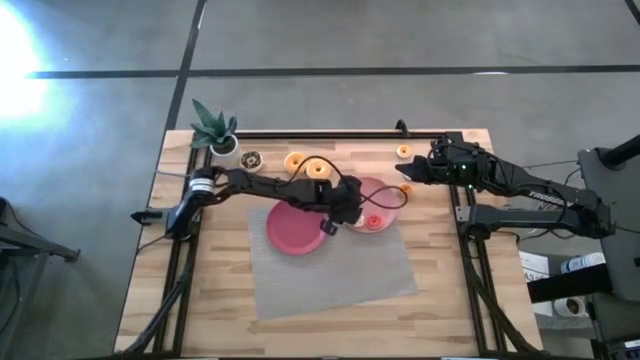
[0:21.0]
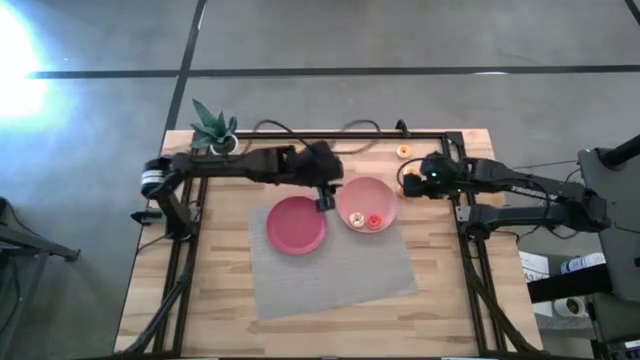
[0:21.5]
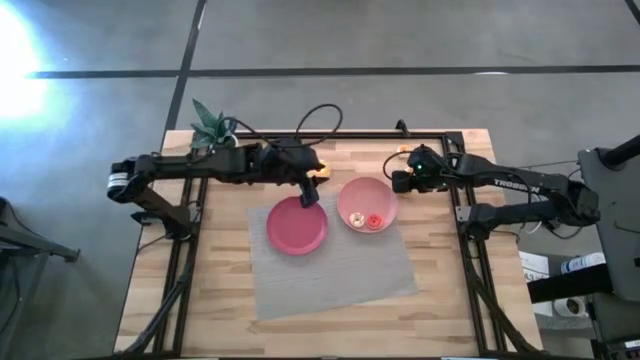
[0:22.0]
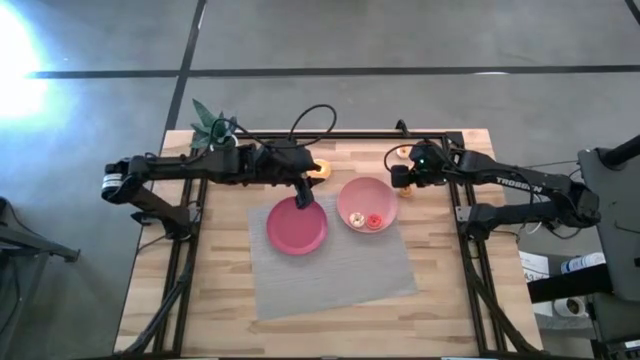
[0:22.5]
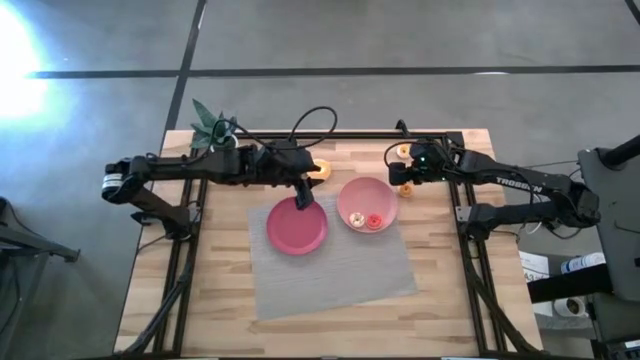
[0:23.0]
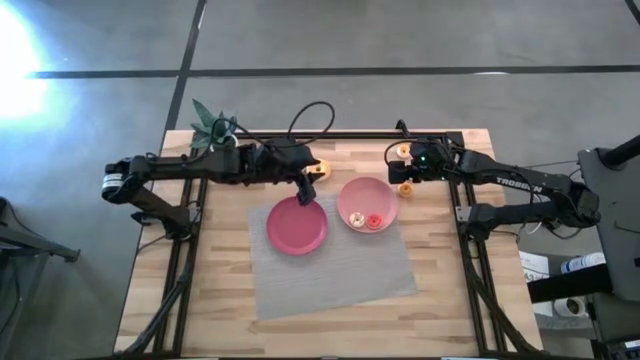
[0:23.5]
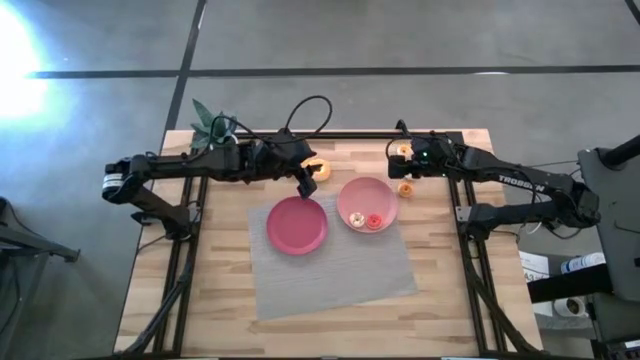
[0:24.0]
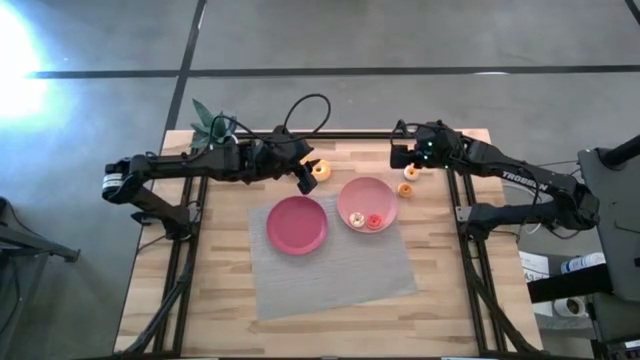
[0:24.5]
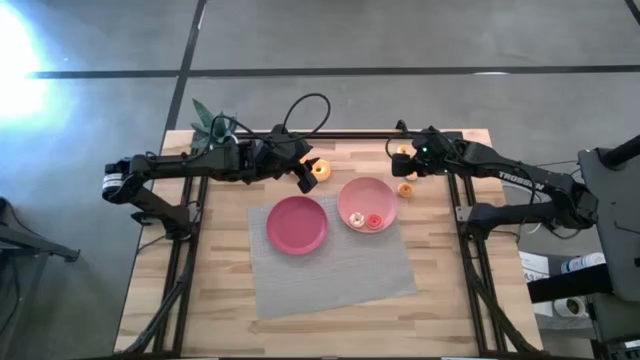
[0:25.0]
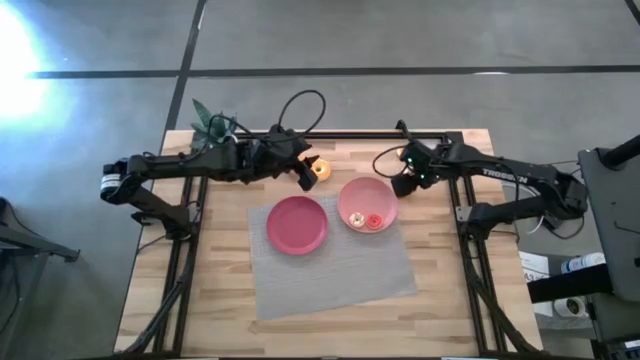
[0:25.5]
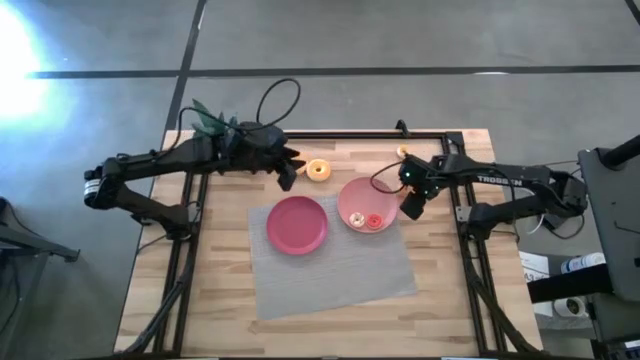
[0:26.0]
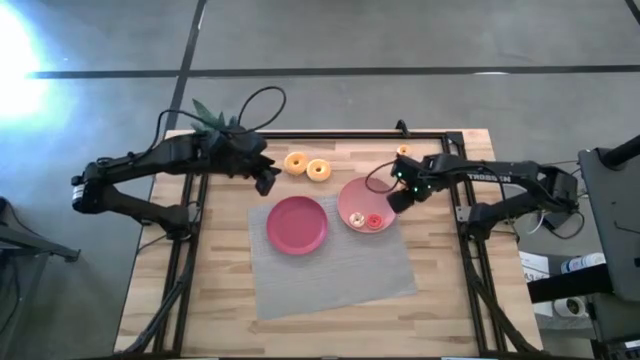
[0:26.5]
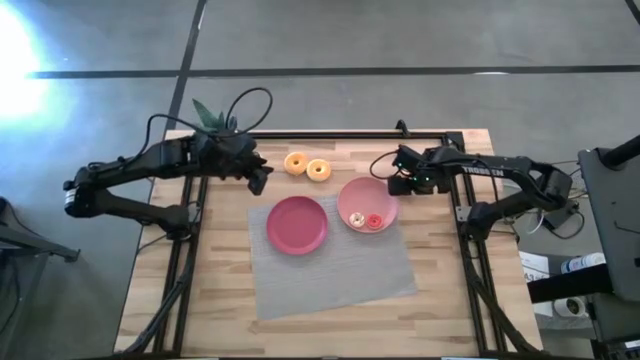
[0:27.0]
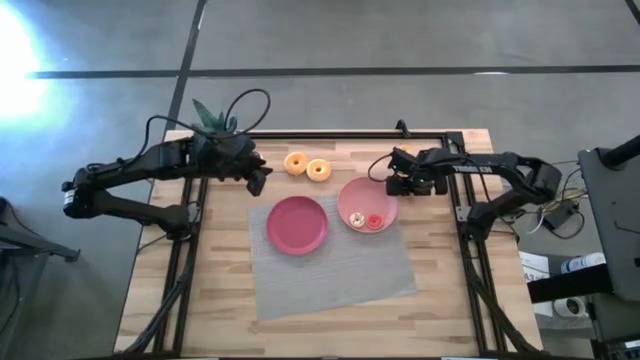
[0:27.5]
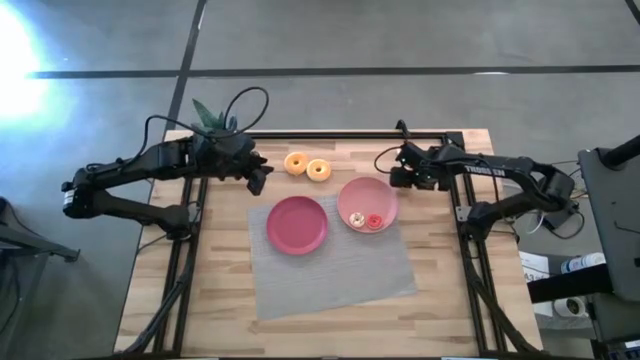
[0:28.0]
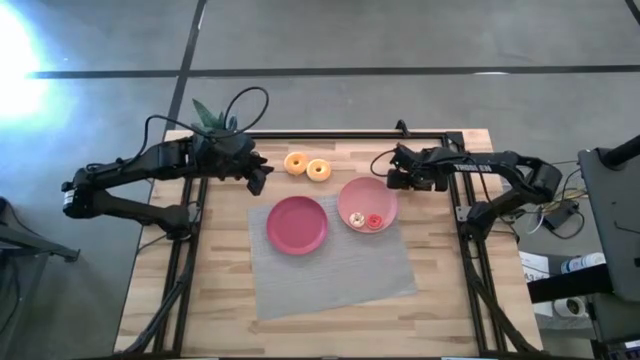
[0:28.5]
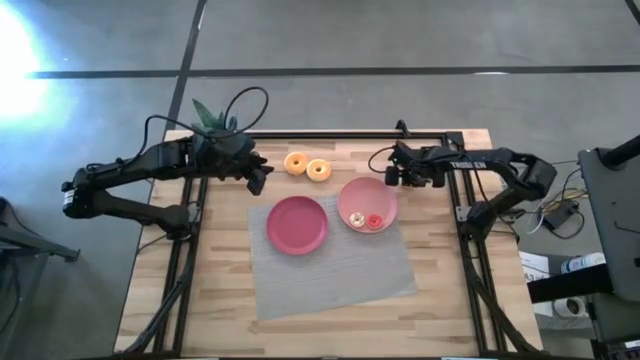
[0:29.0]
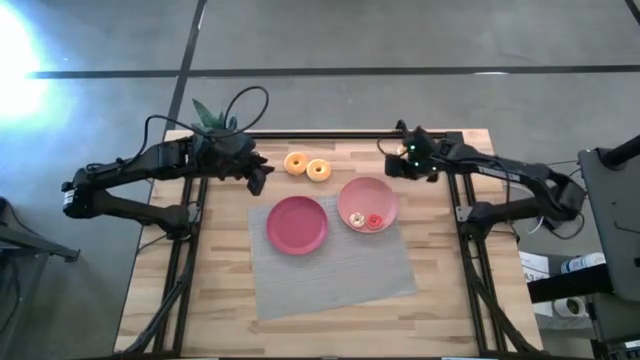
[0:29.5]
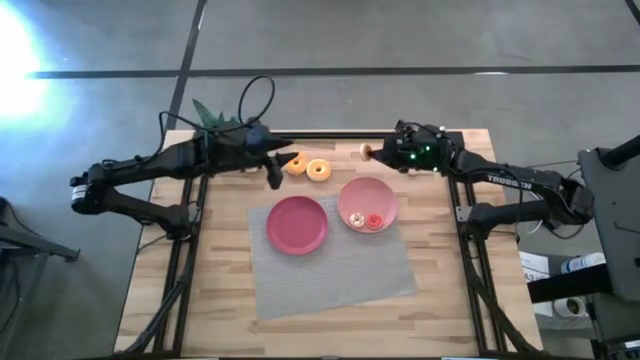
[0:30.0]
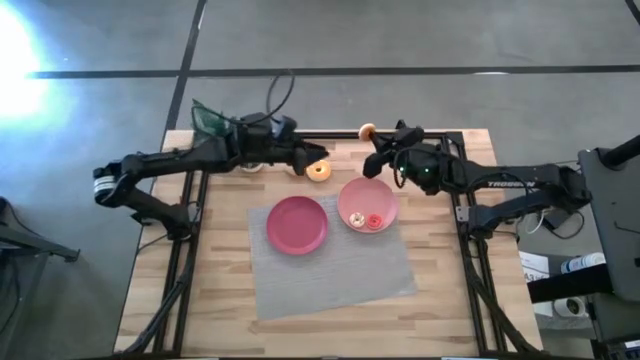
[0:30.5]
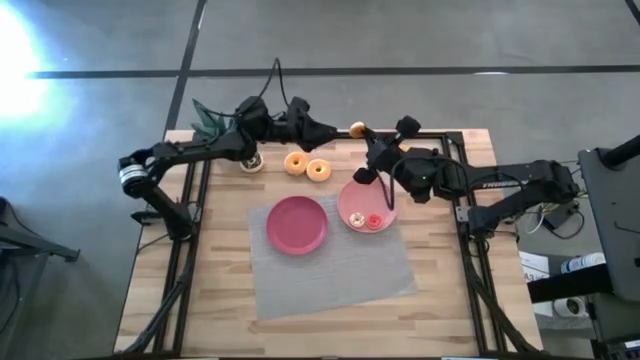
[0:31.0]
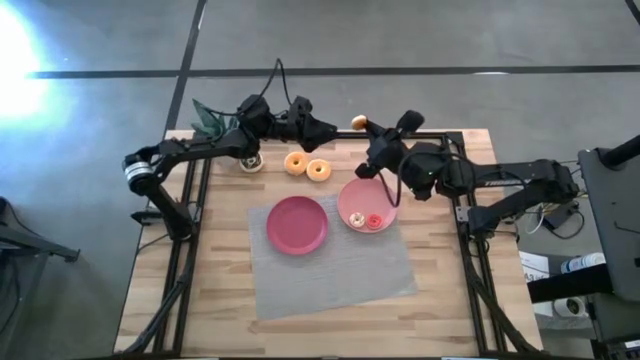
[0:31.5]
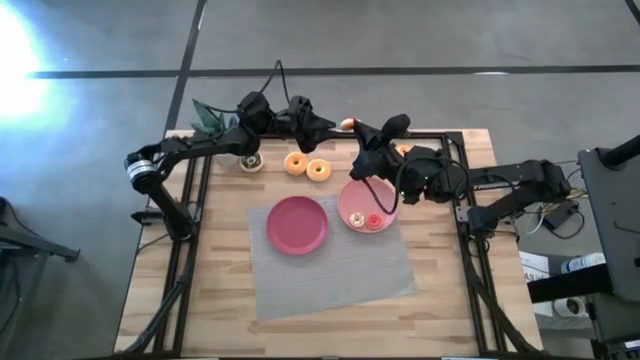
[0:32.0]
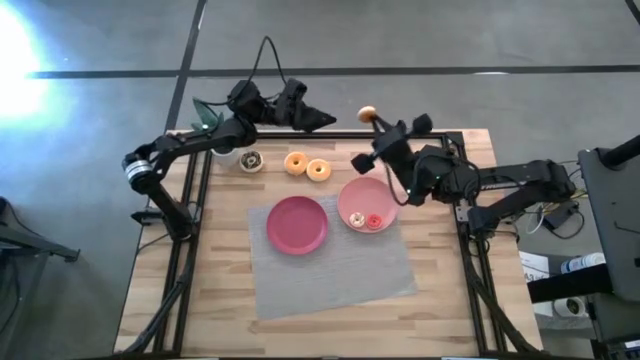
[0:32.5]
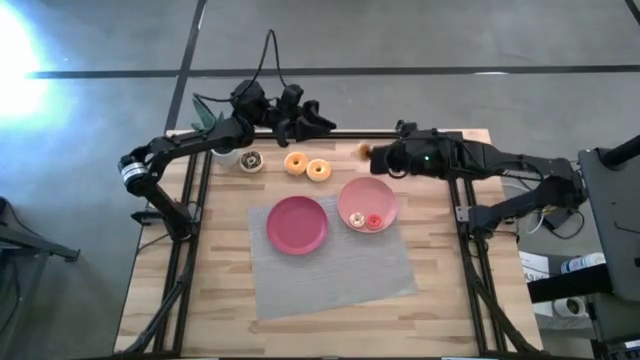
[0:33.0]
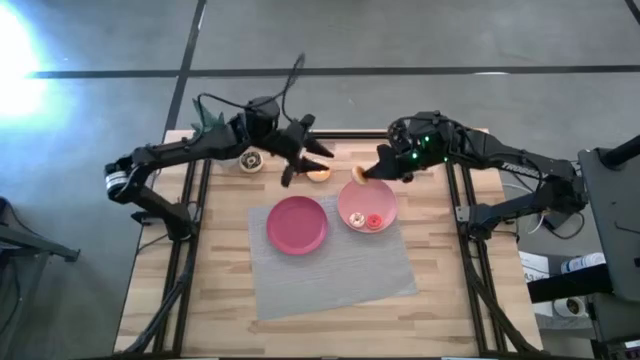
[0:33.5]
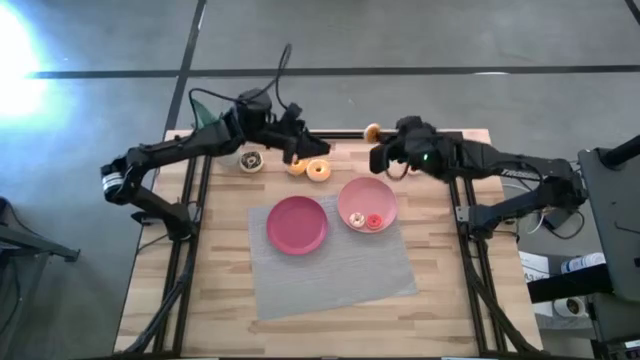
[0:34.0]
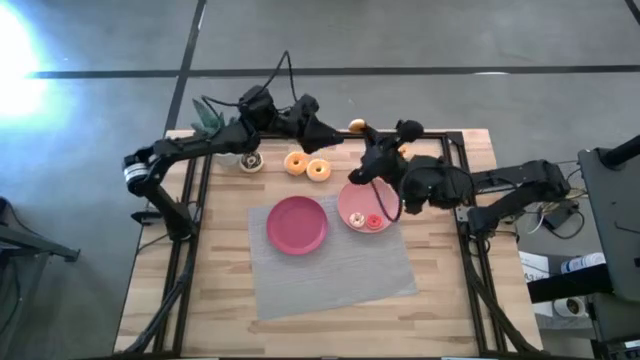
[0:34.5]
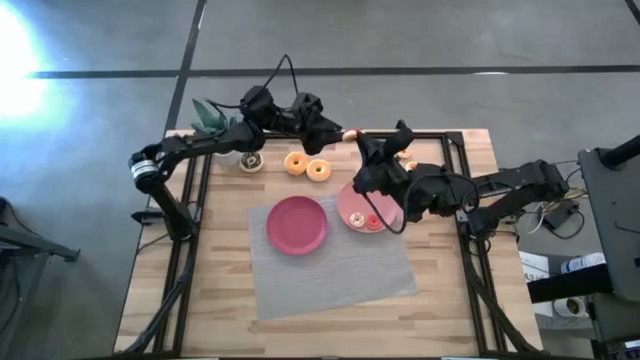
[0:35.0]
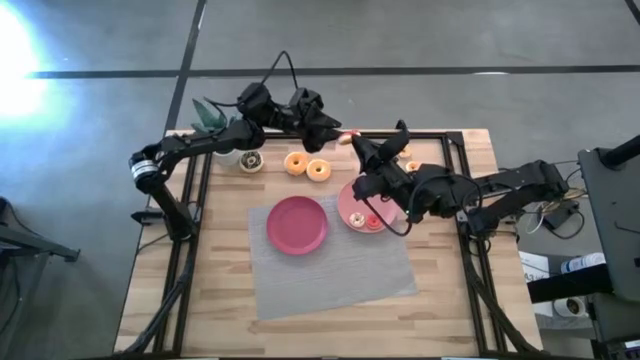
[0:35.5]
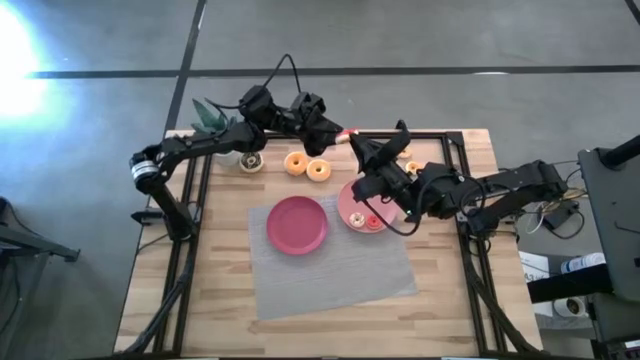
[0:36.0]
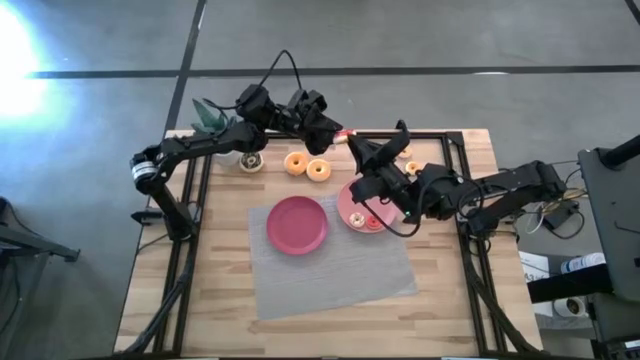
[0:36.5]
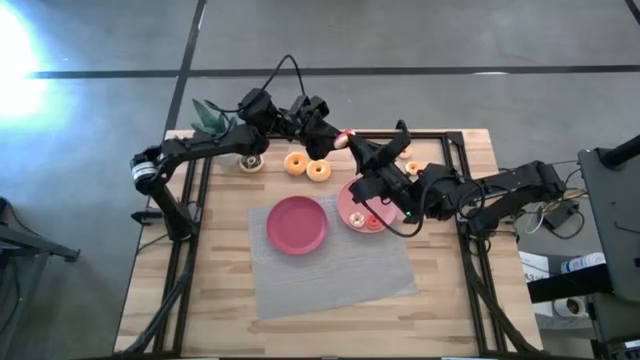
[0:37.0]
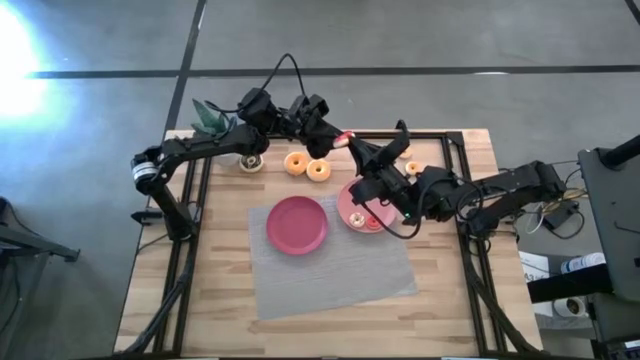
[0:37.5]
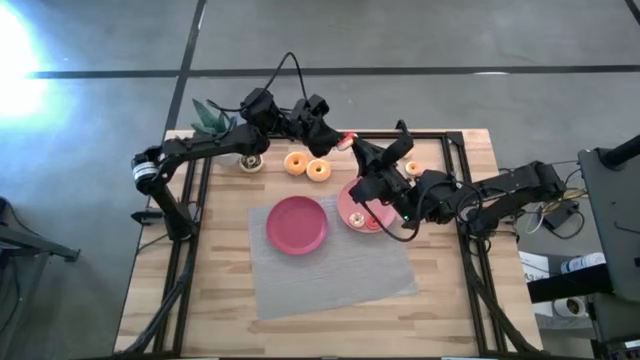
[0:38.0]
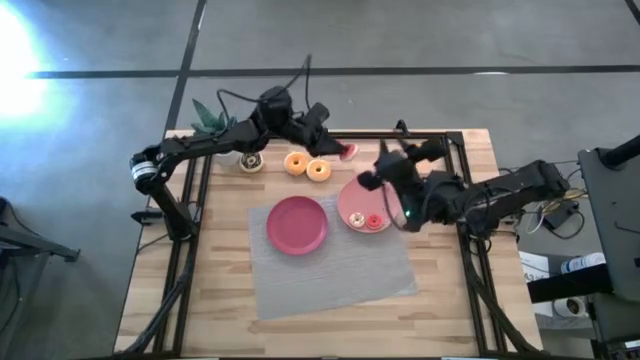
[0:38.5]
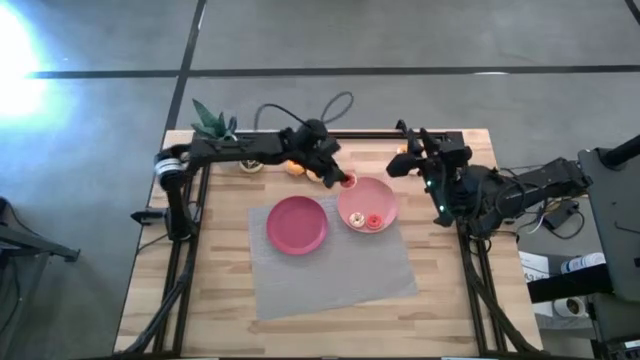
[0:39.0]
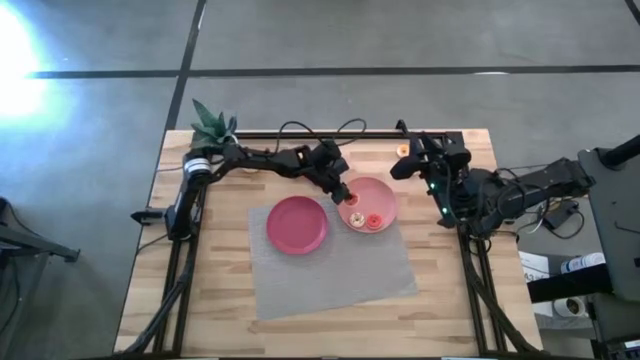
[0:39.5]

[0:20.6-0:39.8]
Task: Pick & Place donuts
Put the small orange donut on the light pink plate
